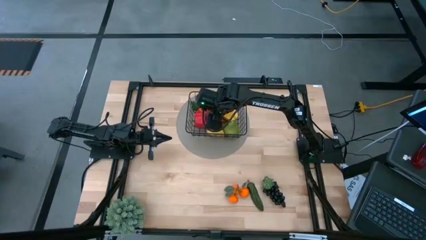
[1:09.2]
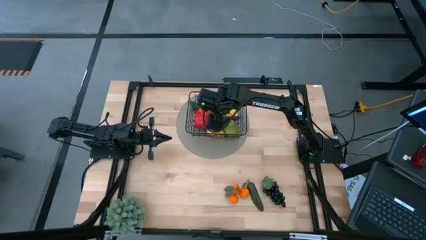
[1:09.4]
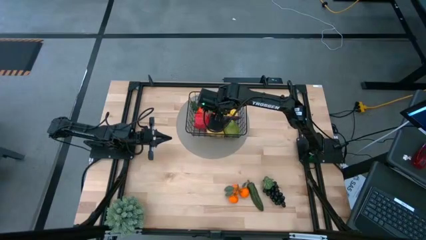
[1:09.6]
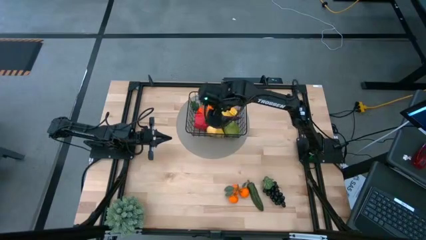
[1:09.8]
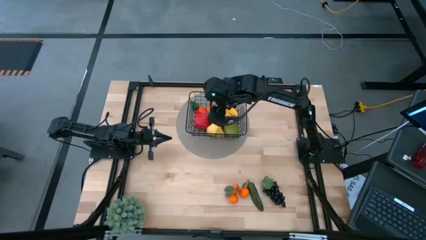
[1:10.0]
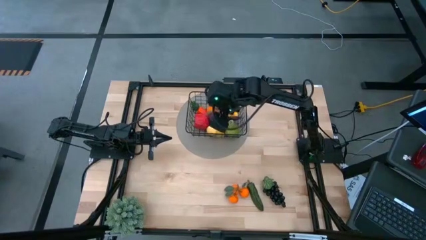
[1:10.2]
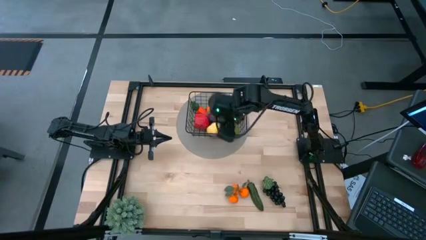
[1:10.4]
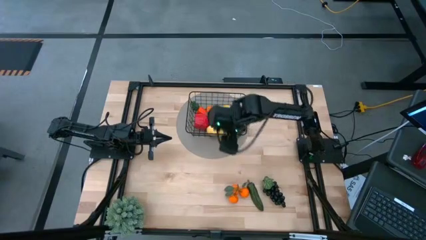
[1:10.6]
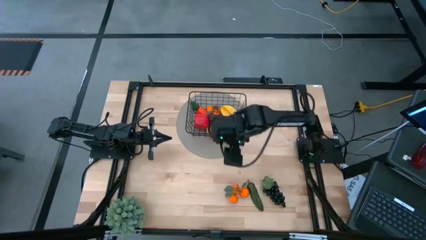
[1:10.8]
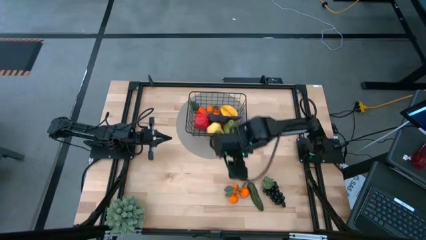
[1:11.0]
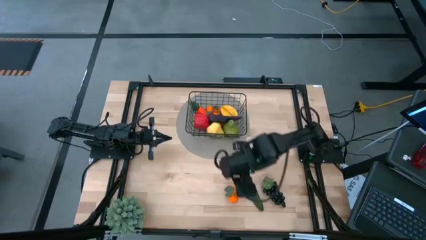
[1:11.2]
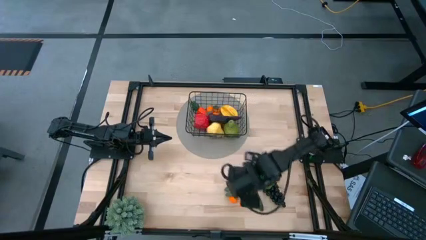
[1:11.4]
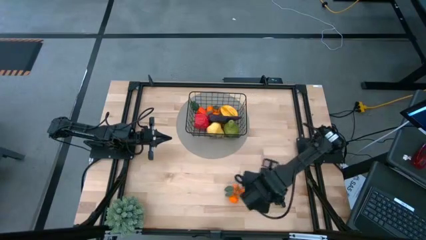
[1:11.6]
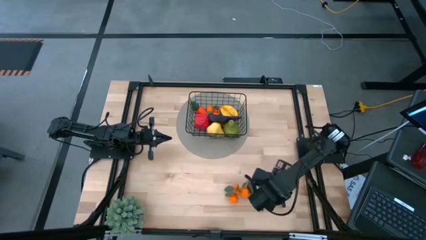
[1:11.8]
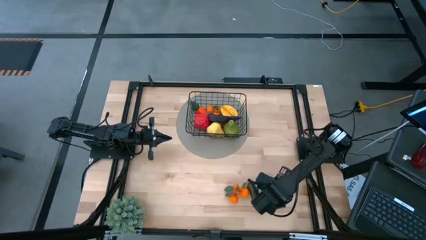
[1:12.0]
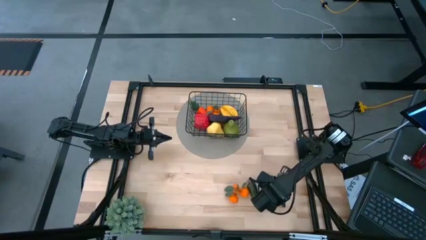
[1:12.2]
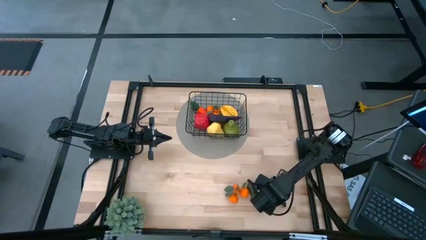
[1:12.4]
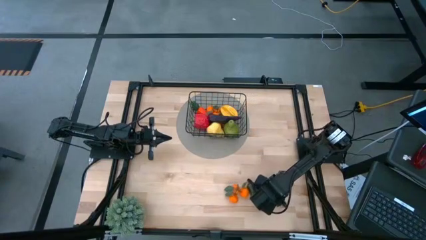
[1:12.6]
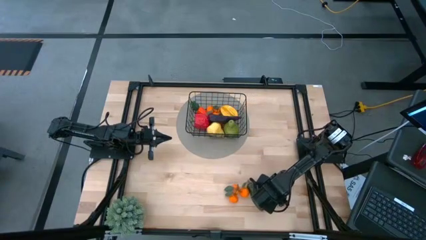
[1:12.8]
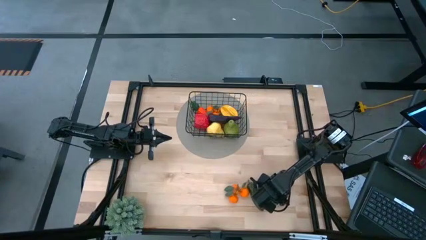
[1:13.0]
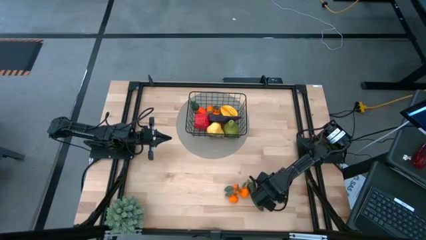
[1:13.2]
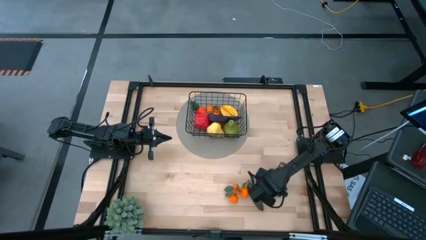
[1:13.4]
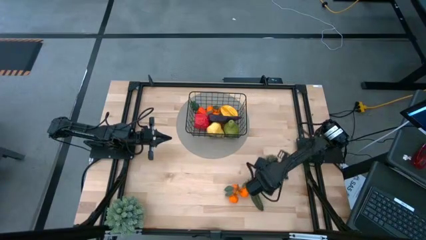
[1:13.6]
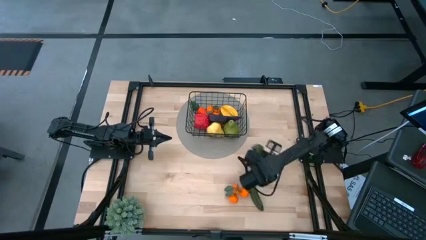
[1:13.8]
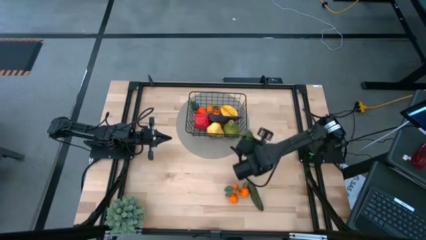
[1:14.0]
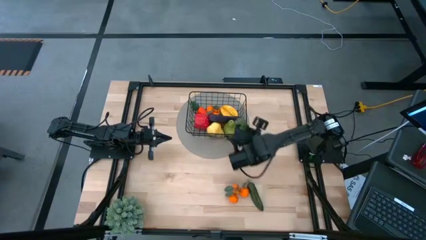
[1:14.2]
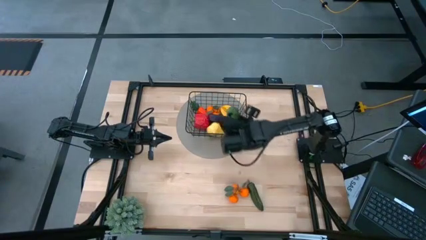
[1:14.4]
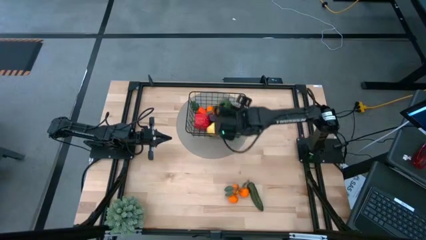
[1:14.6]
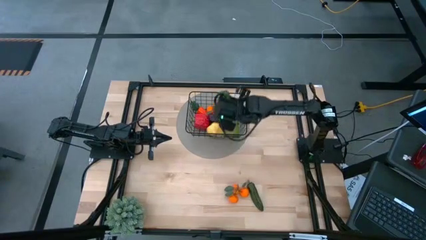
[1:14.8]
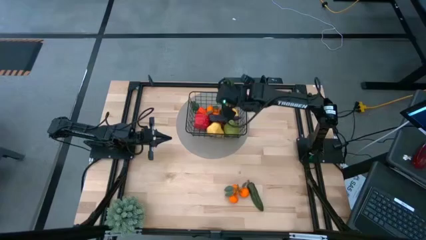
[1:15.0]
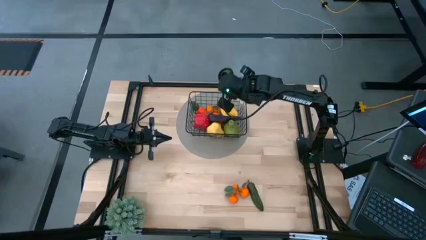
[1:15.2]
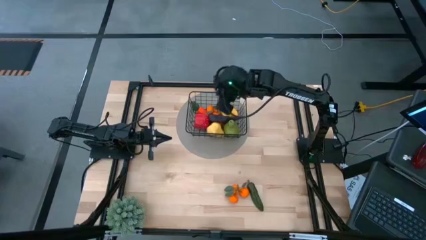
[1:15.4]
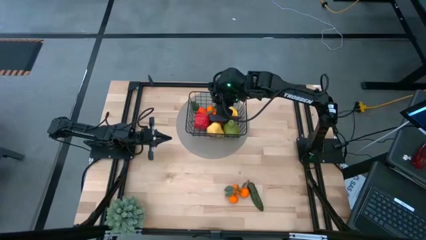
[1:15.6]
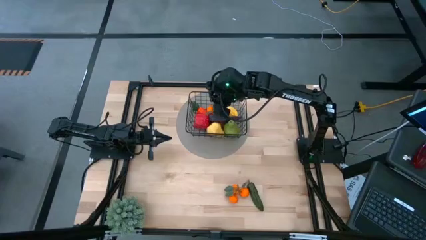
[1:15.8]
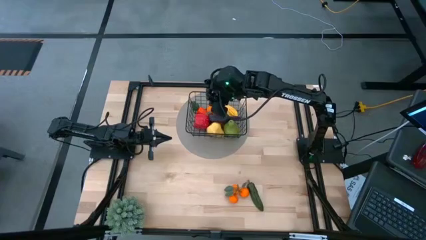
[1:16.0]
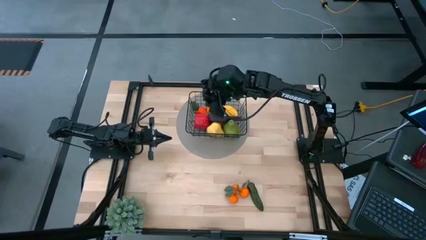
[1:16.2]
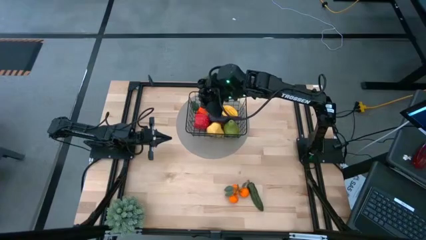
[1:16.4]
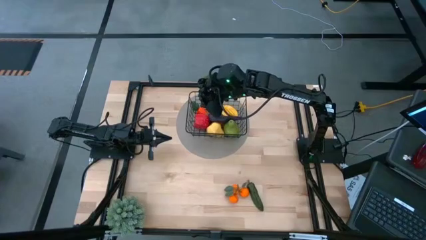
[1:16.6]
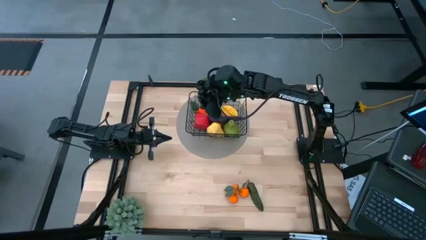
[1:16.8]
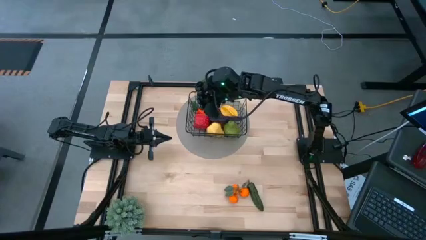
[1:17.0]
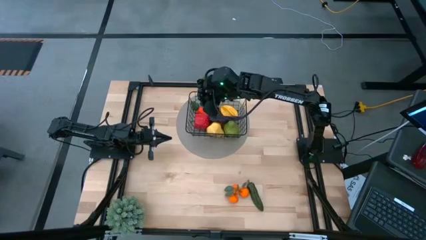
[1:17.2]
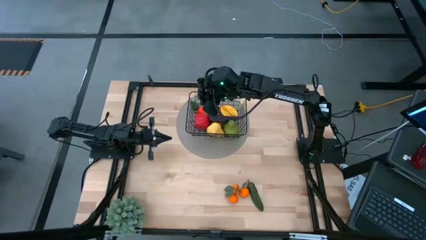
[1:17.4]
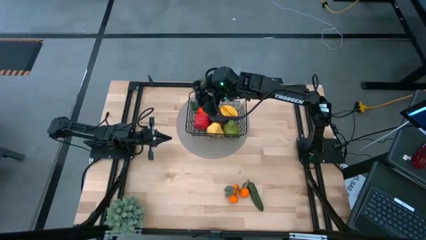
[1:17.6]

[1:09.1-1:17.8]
Task: Build produce basket
Put the purple grapes into the black wire basket

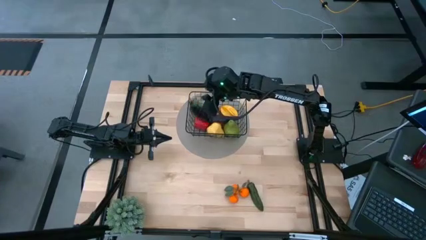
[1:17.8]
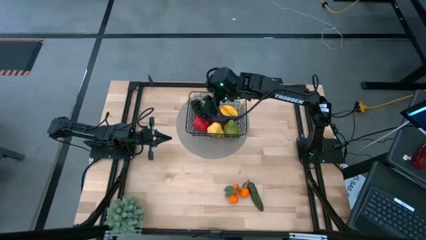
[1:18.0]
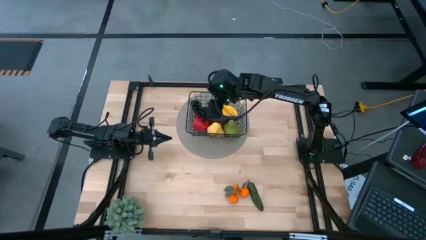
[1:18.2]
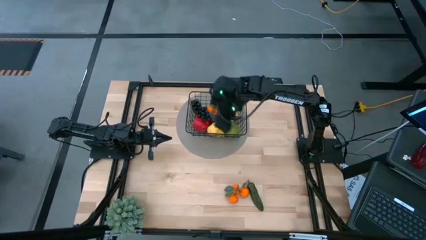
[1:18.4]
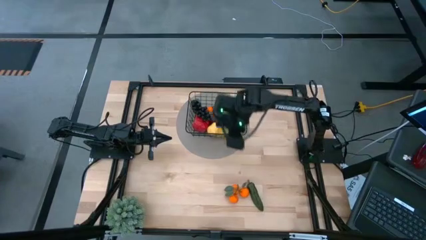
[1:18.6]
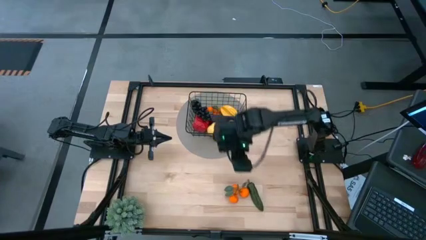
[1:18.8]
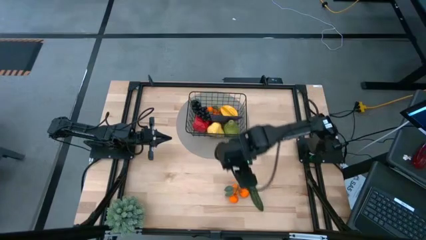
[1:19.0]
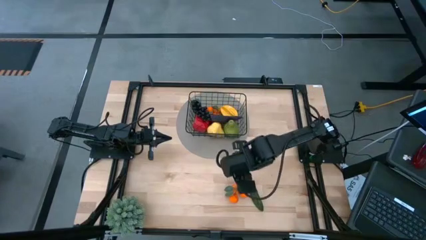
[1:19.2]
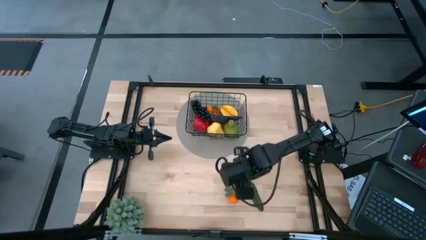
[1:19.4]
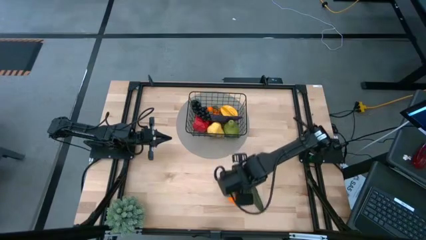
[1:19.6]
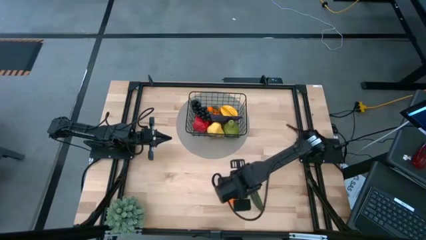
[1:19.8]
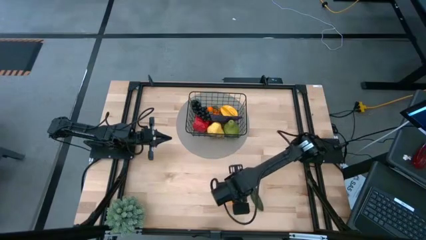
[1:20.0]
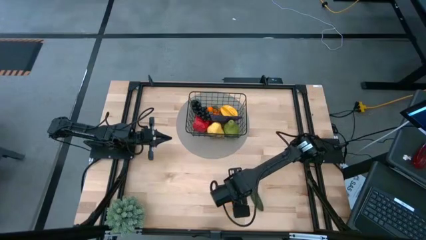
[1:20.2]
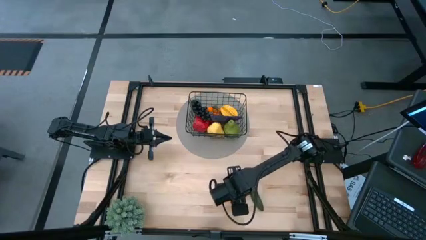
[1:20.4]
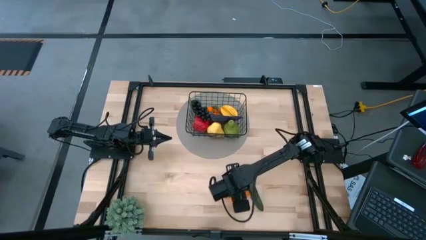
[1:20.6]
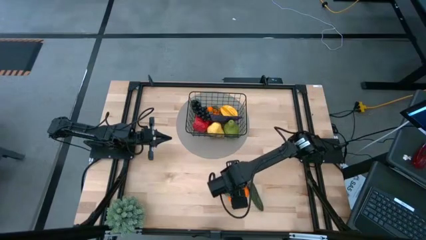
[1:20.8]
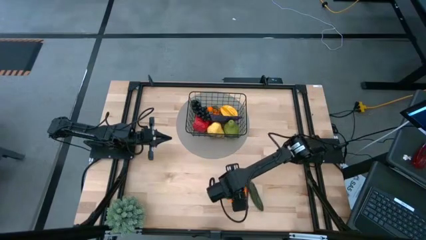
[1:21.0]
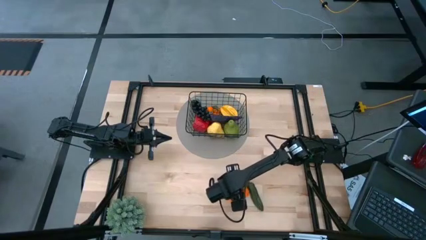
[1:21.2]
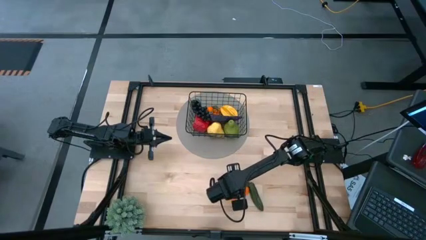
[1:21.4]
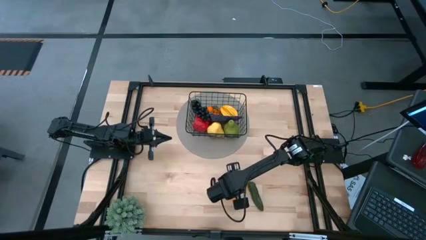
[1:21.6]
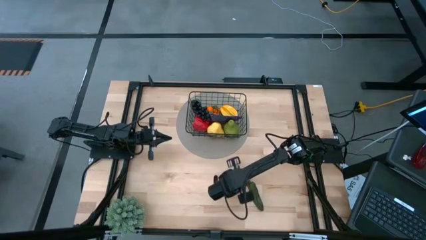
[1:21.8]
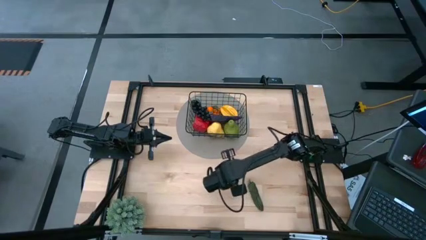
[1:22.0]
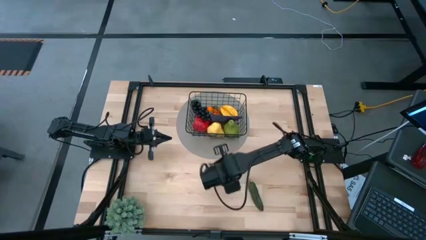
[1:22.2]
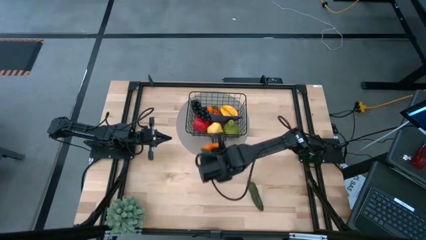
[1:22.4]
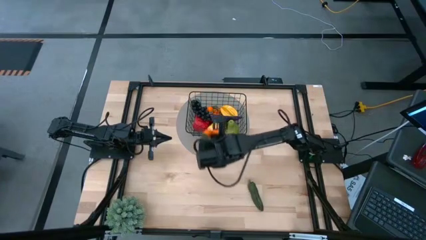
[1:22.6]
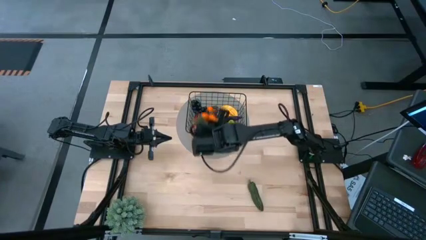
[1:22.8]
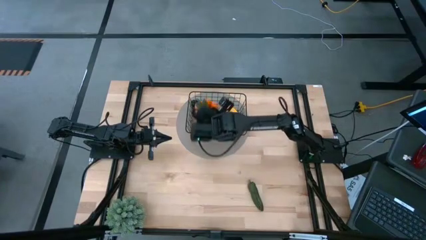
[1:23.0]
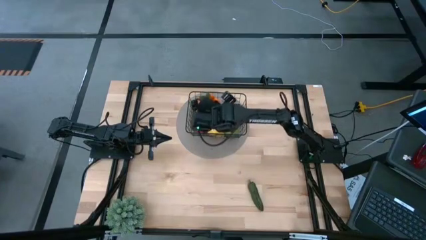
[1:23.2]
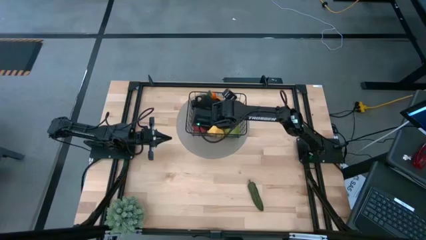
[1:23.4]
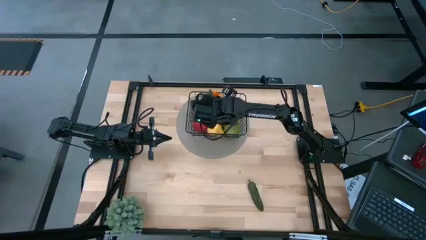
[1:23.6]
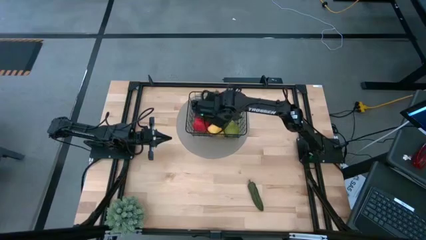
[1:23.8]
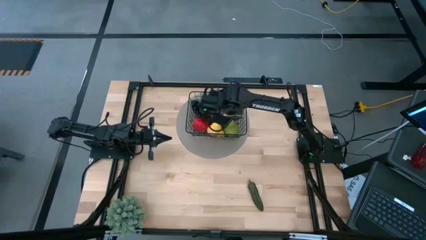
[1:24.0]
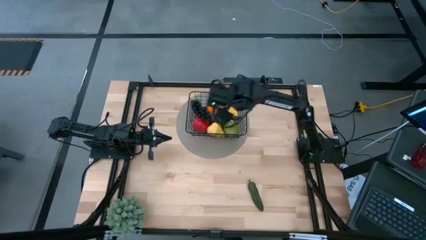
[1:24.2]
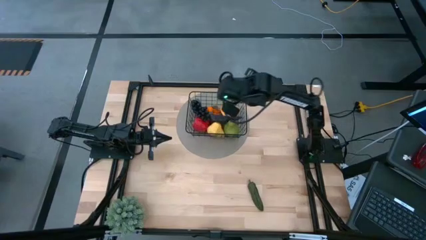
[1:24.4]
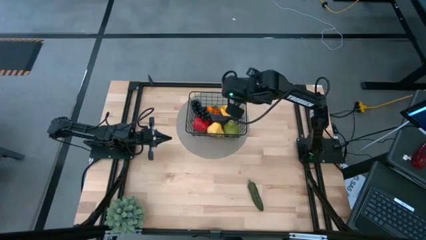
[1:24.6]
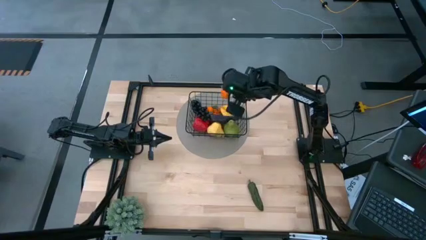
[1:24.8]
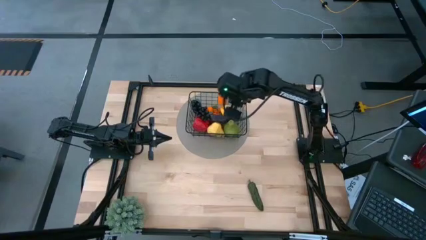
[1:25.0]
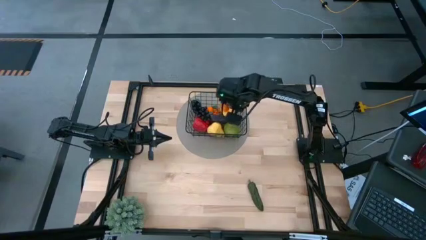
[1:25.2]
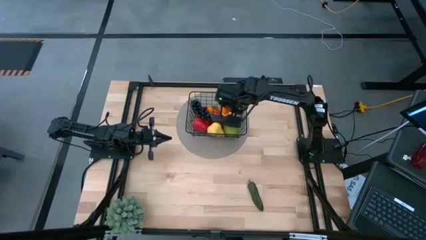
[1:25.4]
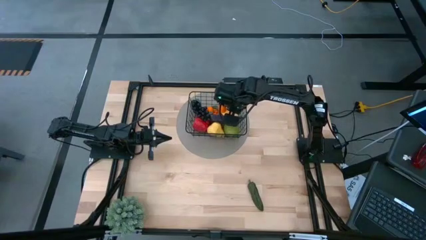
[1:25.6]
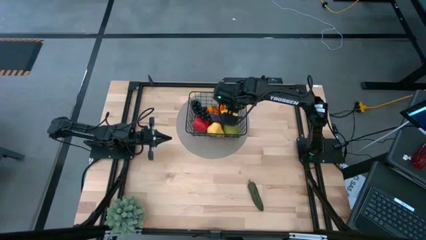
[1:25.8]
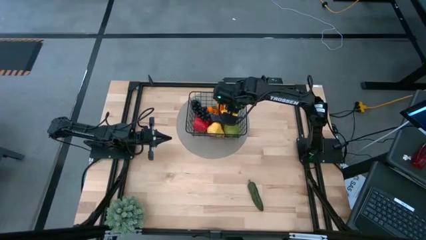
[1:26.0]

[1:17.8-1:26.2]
Put the orange tangerines into the black wire basket
